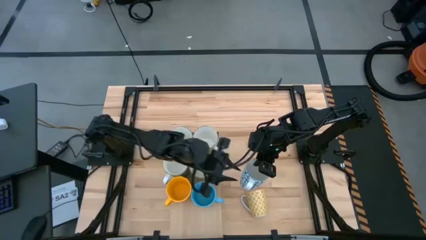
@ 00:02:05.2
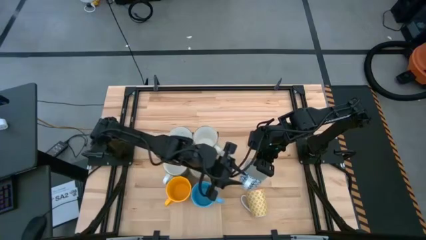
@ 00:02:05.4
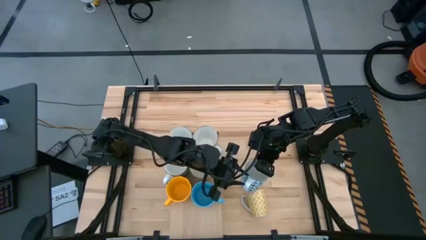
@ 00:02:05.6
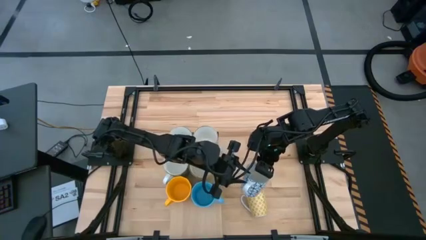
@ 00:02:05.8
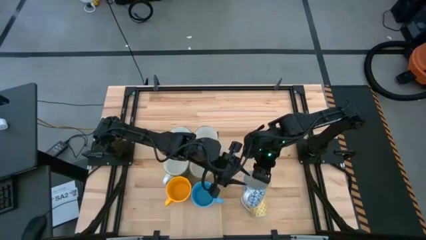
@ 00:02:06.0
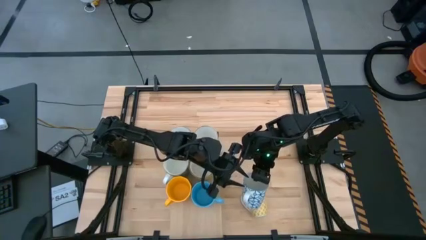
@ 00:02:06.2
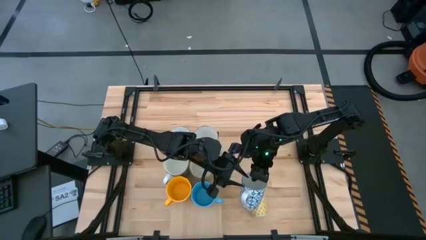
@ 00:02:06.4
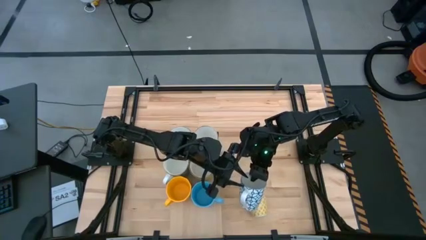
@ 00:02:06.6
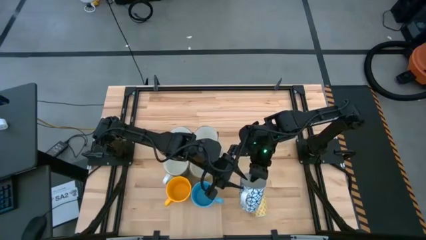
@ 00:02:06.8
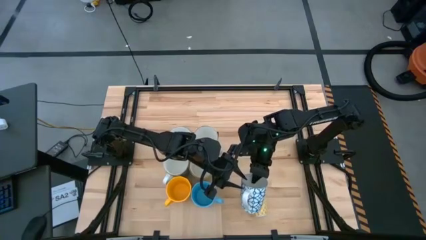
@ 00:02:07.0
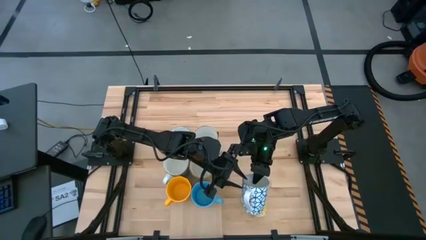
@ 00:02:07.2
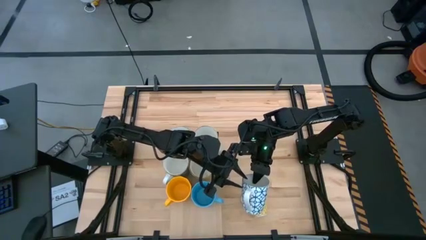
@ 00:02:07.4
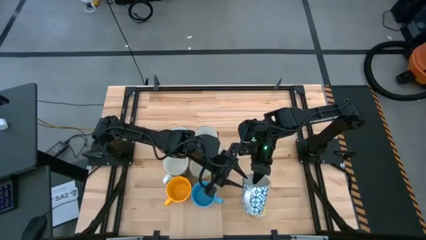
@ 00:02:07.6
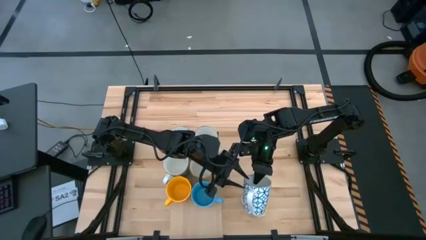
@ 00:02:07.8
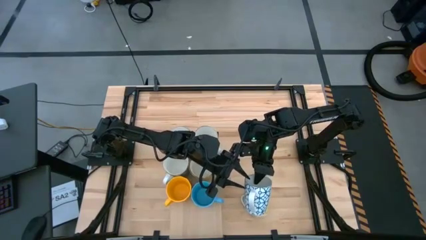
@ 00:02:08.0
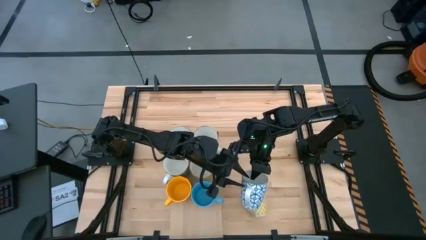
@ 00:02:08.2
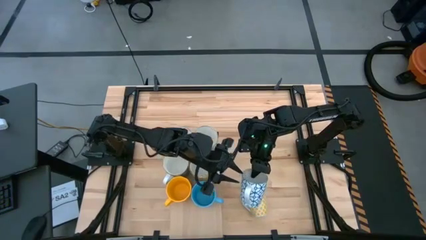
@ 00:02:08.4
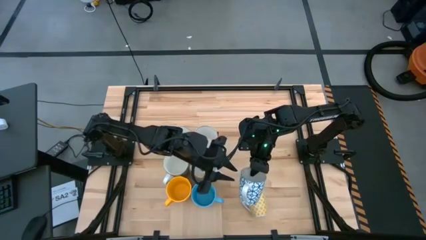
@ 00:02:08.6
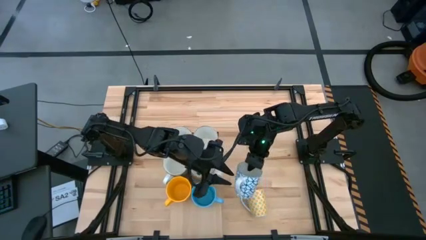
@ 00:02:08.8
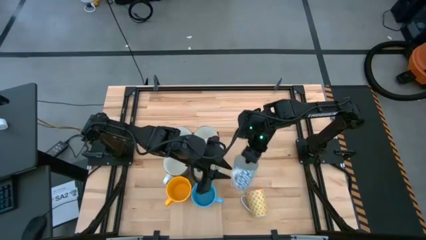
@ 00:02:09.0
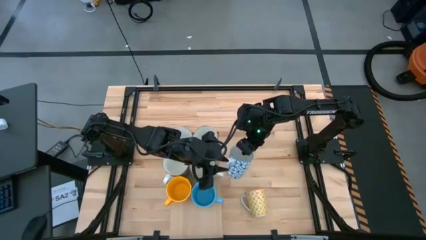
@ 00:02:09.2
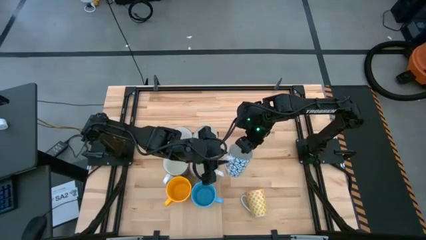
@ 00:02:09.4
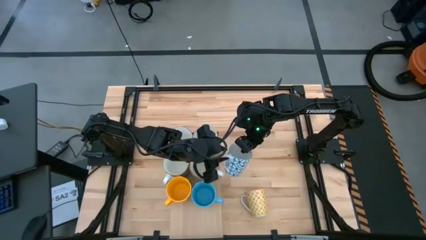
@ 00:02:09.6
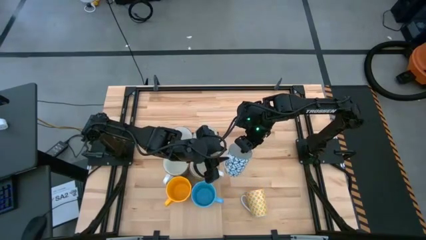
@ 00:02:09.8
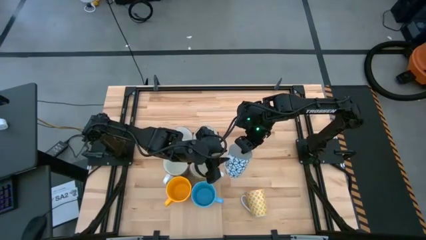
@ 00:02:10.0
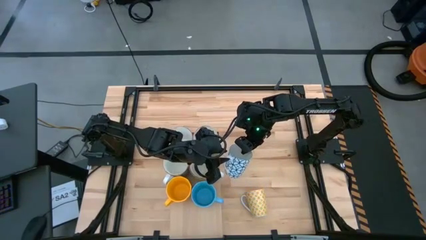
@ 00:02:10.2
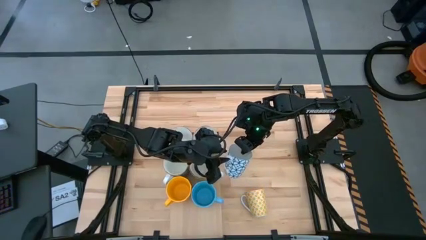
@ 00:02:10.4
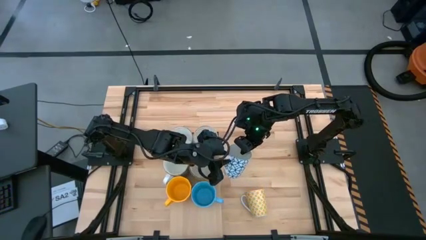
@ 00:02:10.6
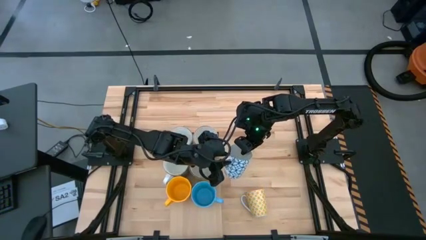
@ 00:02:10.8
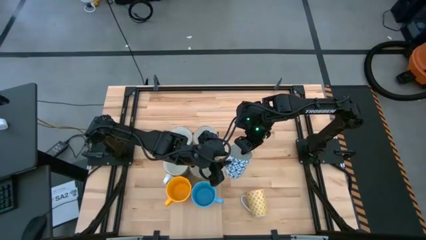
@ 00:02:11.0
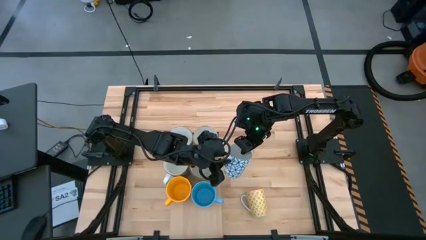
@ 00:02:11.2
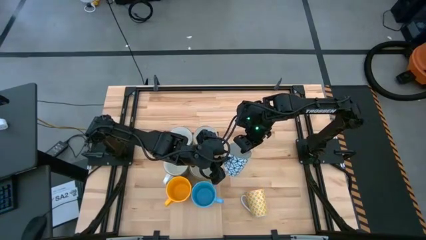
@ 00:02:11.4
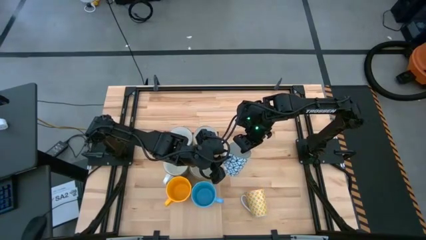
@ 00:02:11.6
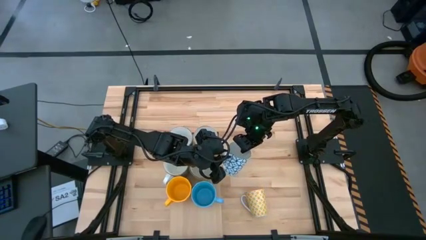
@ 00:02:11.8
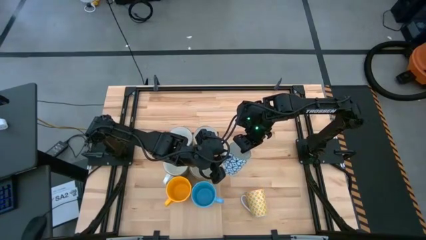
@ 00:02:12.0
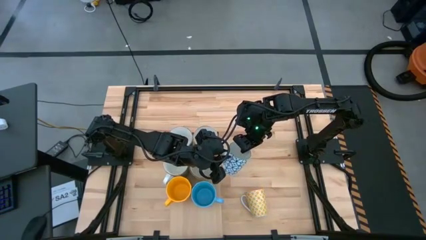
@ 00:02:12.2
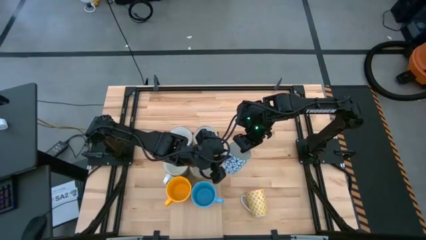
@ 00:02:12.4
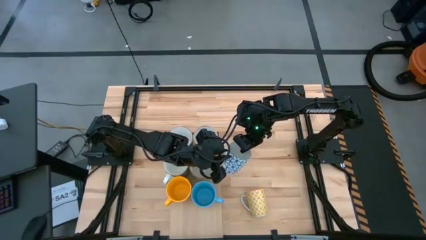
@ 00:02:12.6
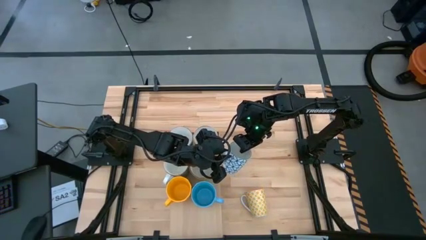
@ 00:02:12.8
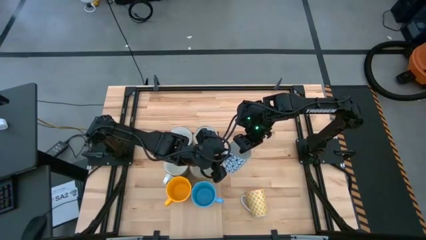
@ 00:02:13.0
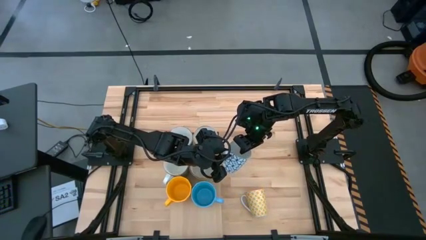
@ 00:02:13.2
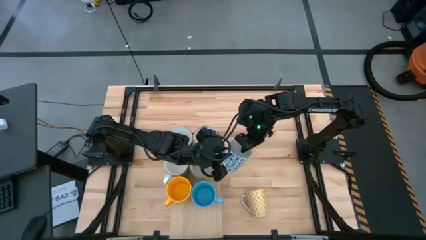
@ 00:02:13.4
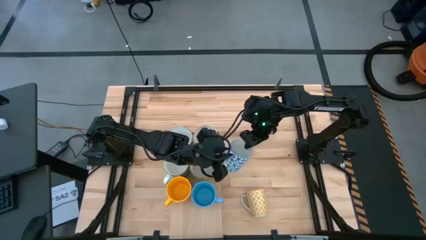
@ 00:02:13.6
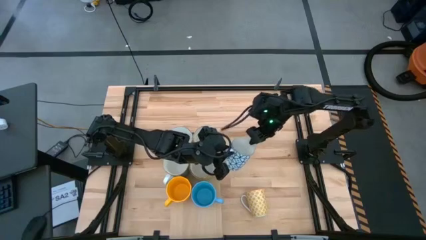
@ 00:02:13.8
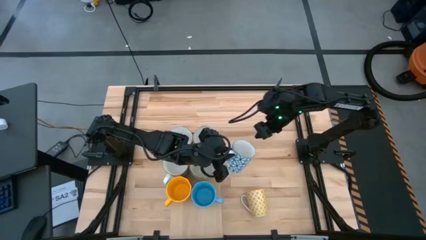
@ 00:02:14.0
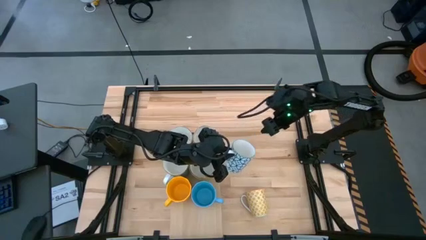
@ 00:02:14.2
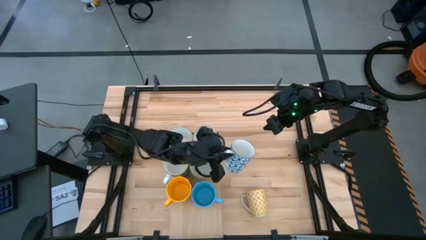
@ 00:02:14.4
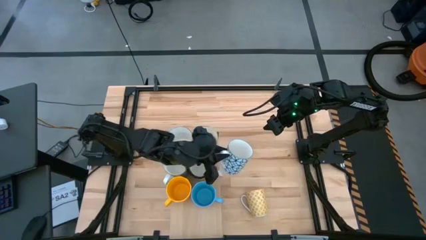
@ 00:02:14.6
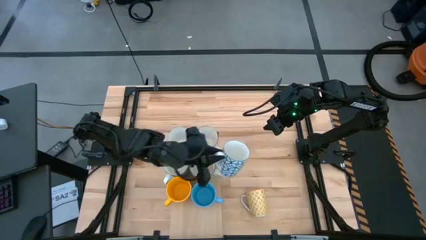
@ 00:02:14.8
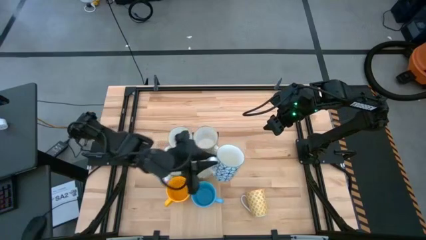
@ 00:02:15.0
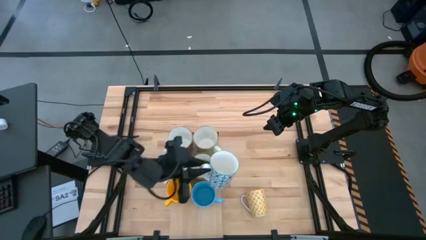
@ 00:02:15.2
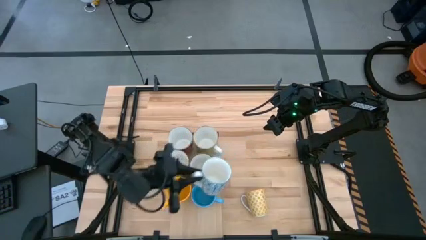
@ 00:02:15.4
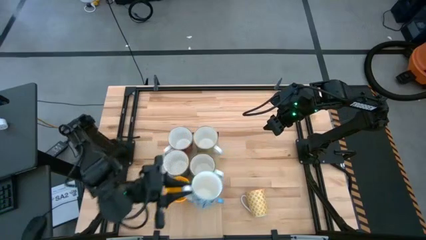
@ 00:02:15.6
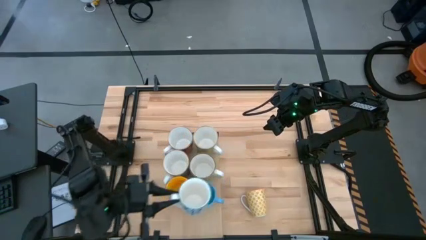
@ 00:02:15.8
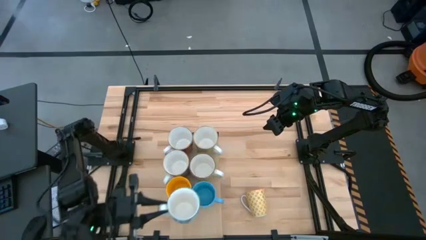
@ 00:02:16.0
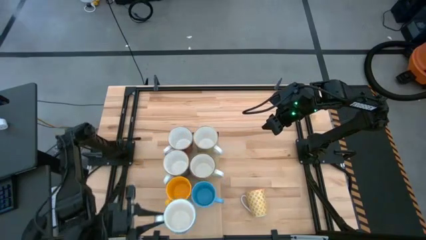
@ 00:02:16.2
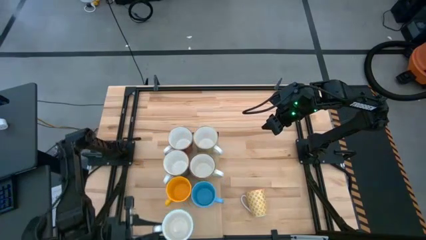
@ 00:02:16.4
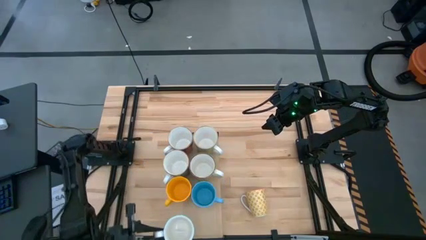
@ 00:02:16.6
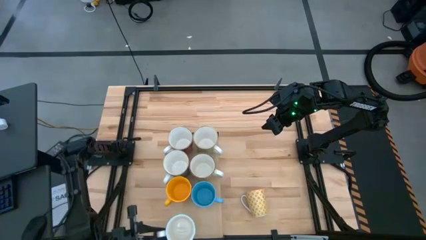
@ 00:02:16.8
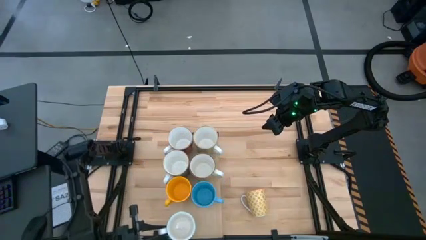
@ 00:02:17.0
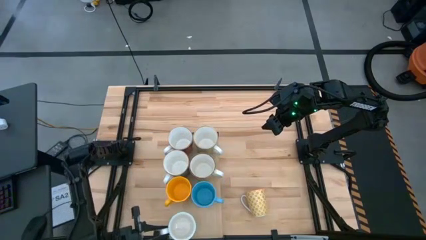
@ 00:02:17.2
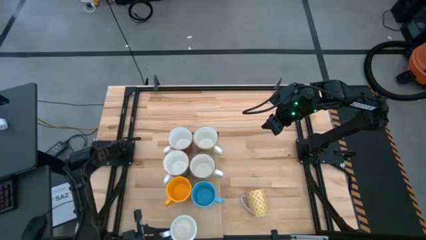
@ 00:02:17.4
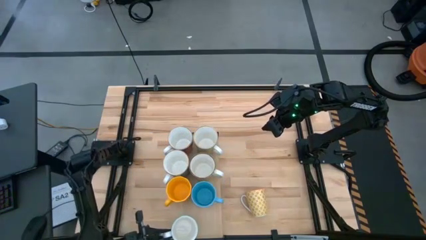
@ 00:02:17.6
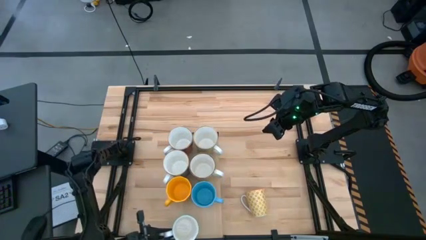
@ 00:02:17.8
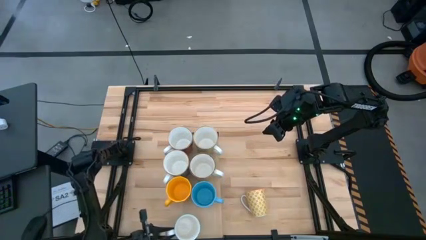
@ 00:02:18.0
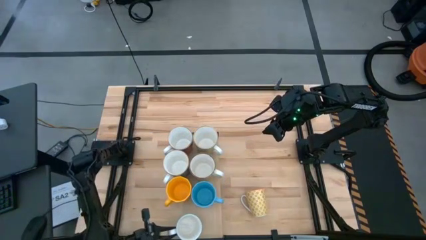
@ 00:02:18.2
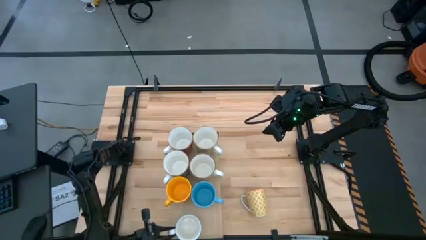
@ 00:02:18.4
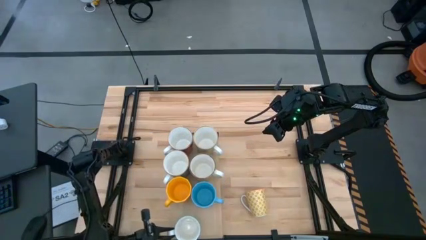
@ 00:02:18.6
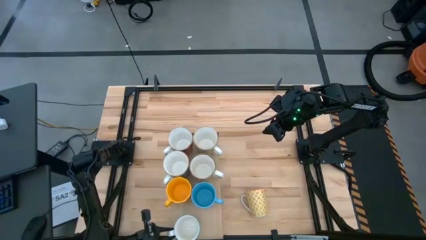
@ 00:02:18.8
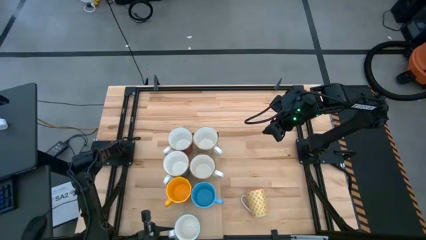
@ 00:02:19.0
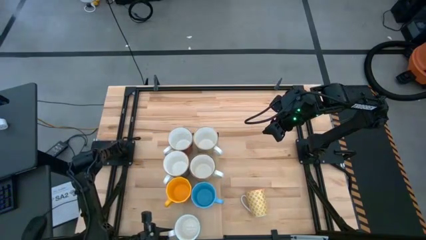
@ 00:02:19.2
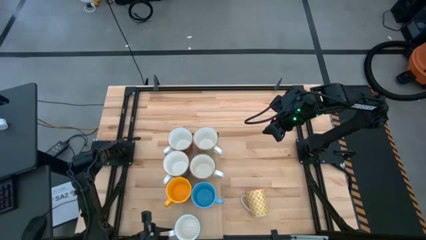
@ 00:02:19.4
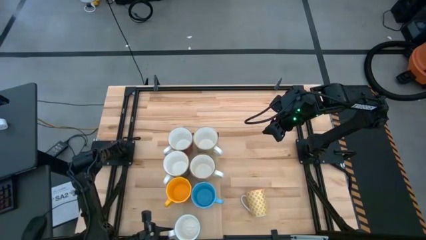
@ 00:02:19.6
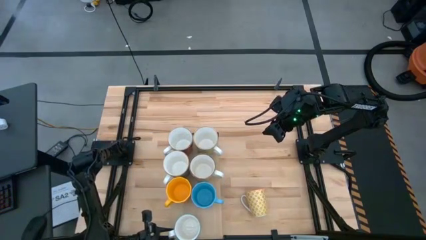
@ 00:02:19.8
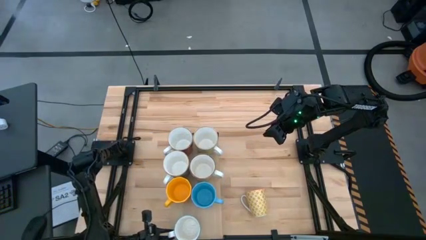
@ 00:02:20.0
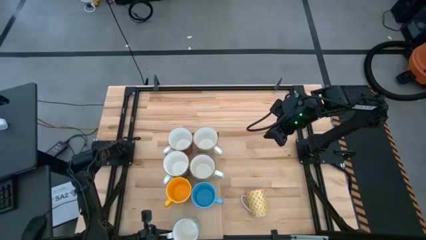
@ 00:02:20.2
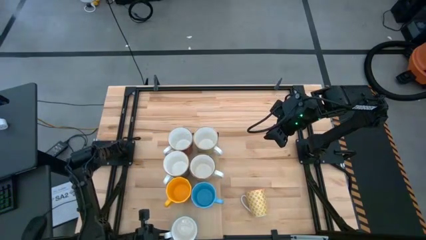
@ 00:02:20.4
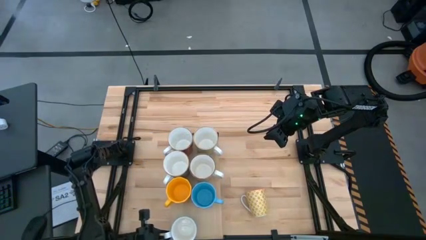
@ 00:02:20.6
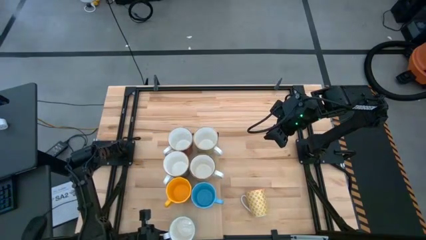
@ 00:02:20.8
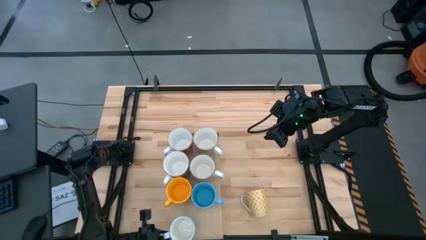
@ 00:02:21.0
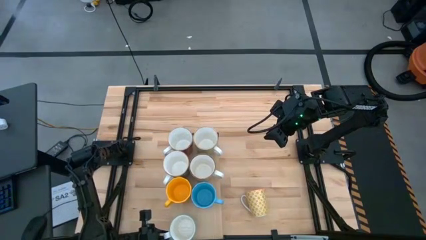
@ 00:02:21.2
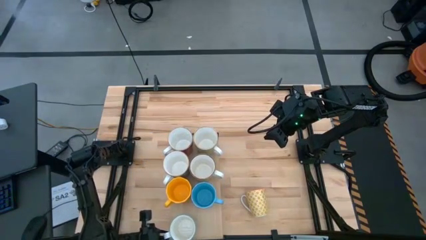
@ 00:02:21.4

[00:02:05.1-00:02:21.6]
Task: Place coffee mugs
Put the blue mug on the shelf aligned with the yellow mug

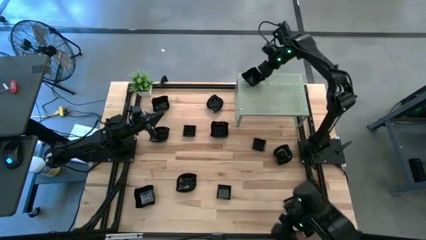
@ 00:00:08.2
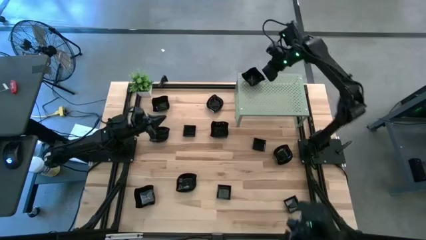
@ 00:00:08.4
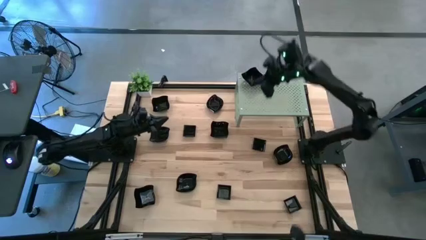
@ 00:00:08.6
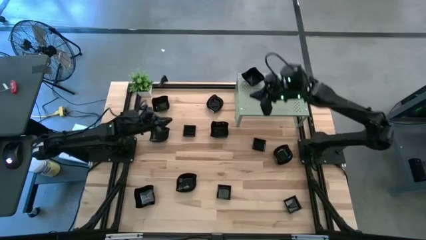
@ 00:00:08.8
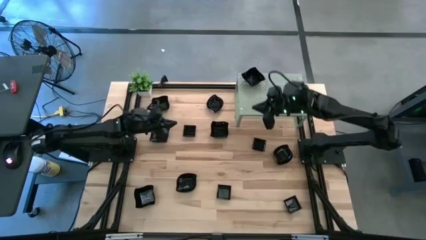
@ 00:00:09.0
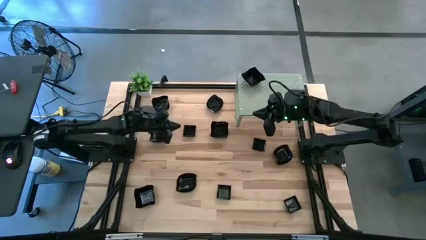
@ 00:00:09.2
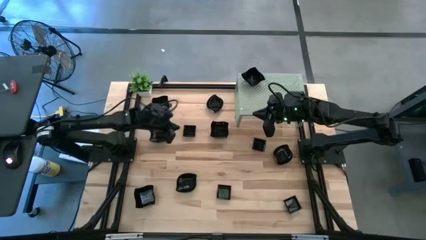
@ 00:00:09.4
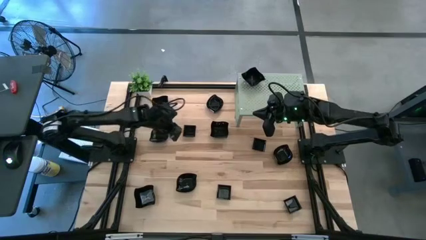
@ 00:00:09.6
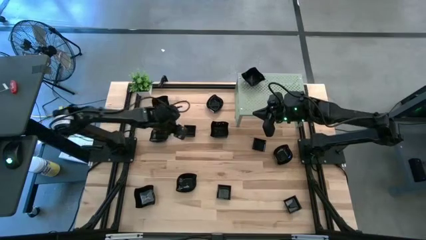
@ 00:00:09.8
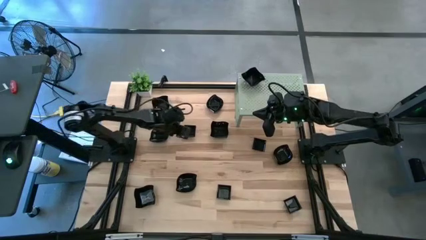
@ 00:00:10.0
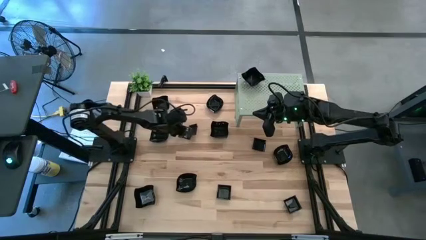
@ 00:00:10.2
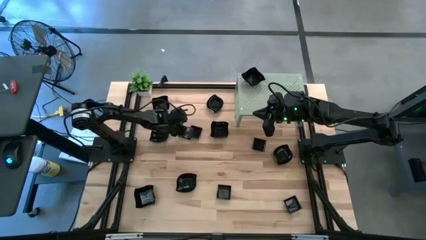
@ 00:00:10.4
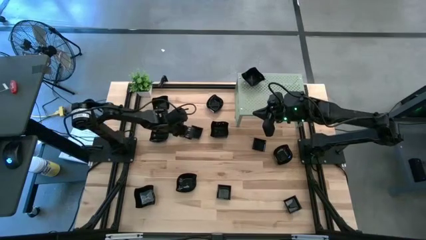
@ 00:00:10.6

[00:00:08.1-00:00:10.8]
Task: Pick & Place Mini shaped plates
Put the square plate on the shelf
